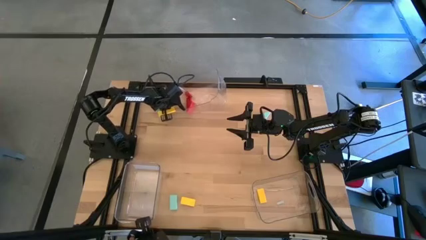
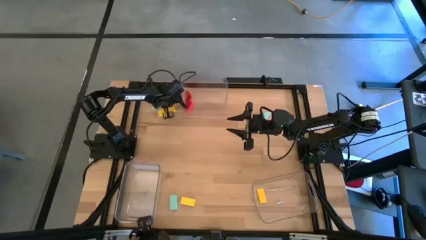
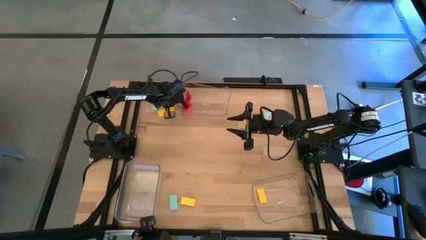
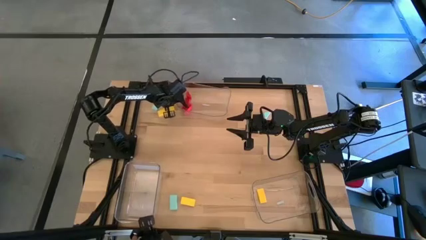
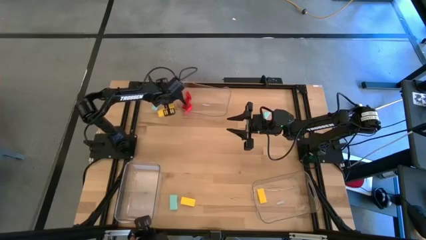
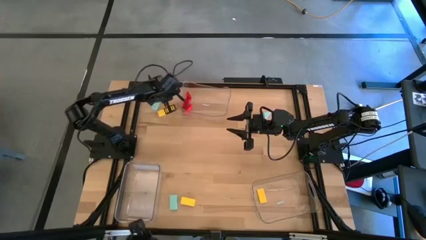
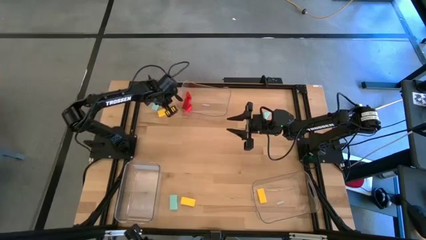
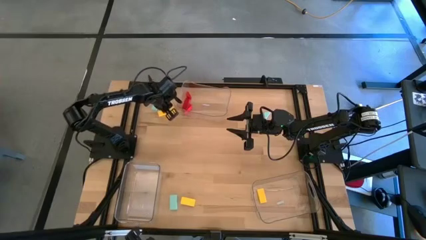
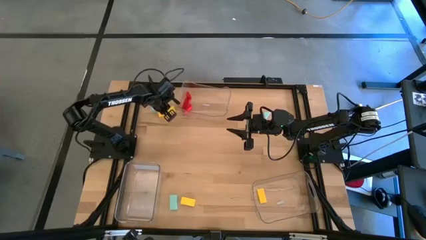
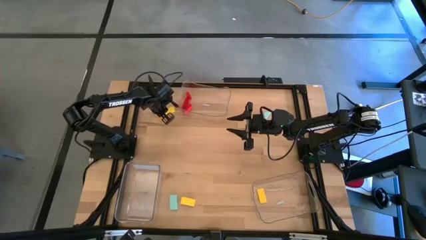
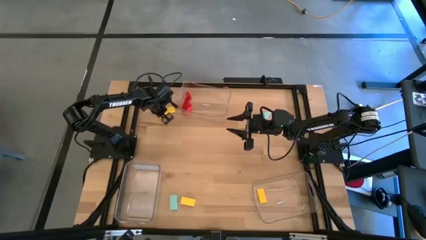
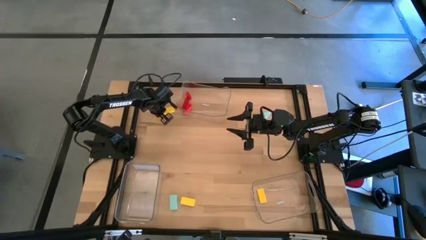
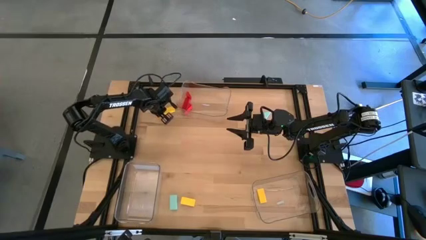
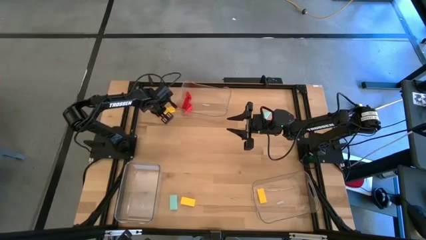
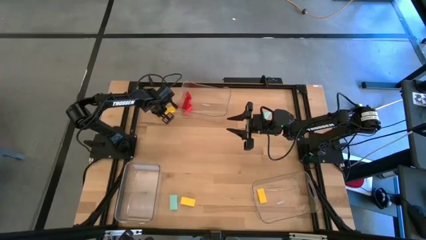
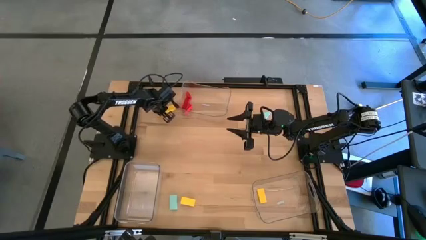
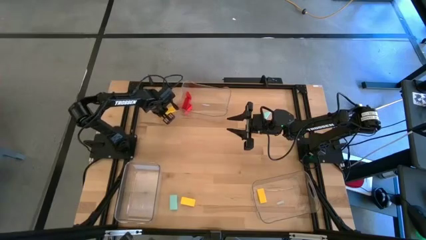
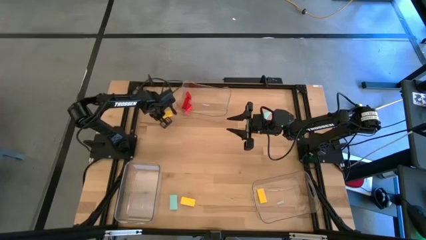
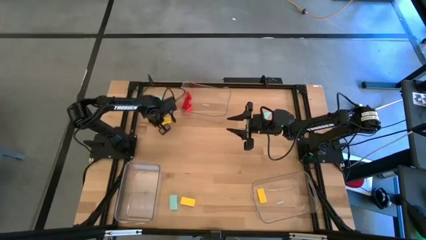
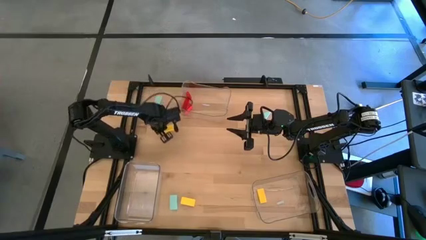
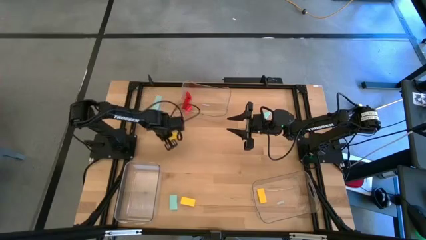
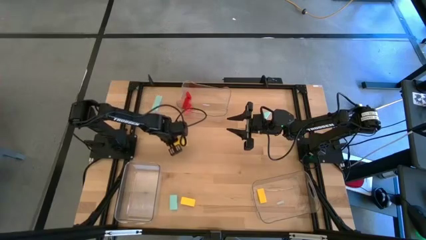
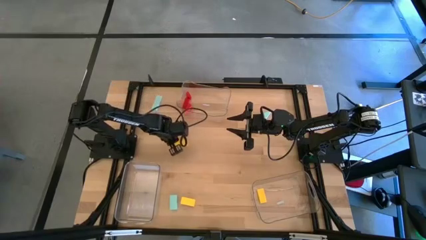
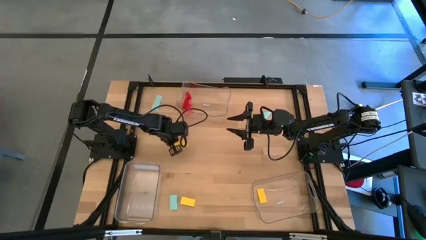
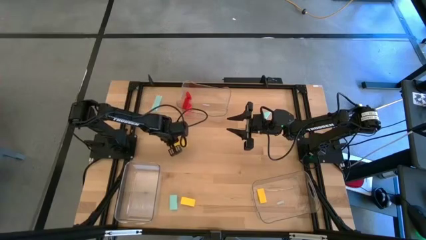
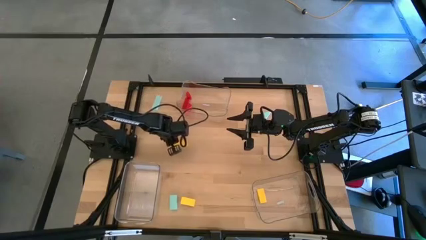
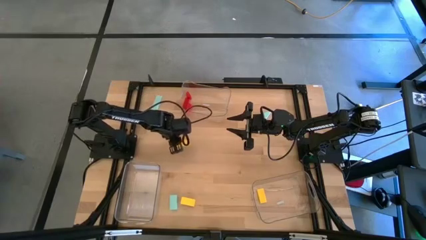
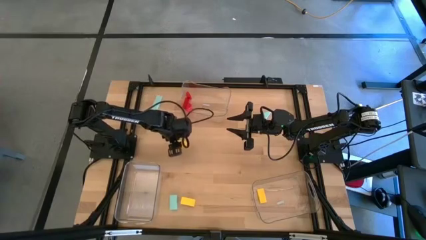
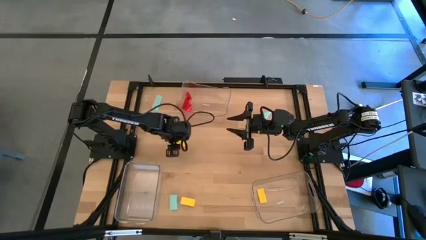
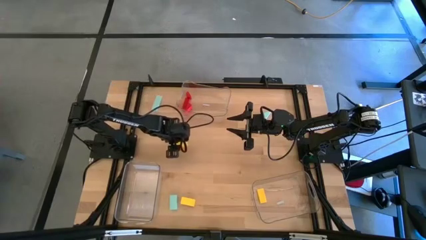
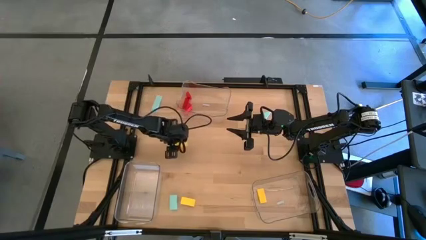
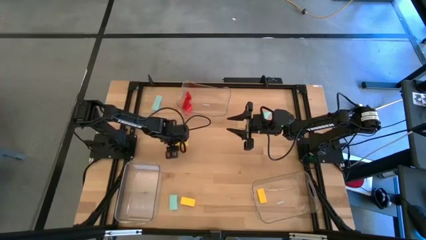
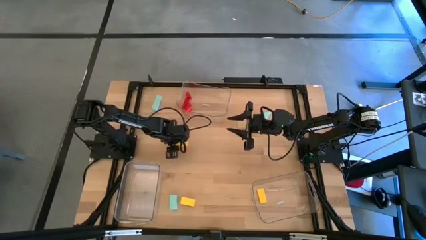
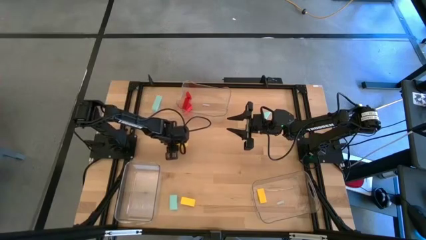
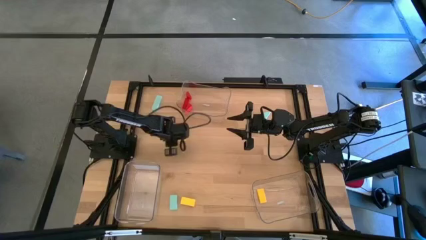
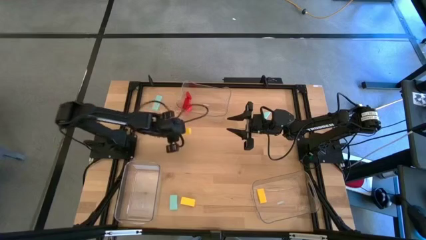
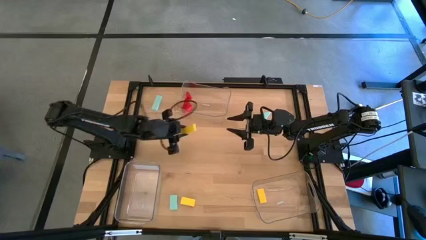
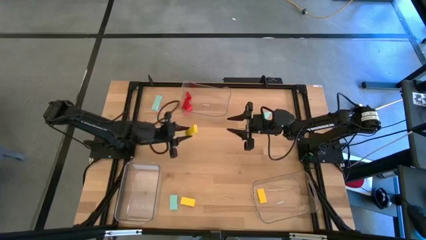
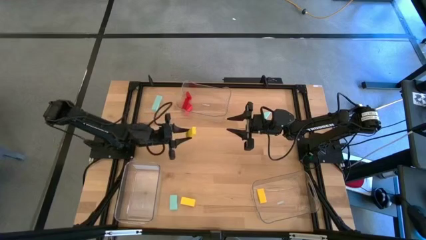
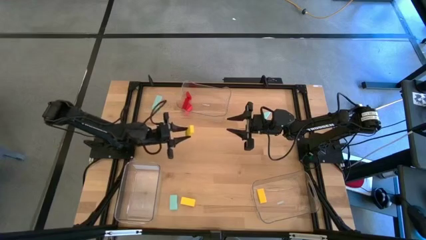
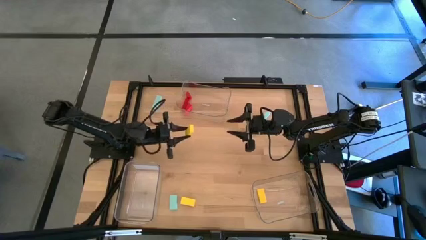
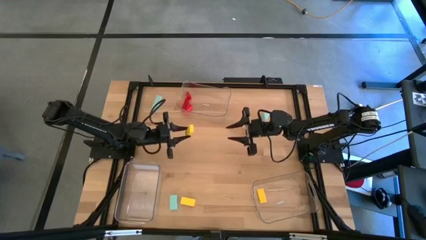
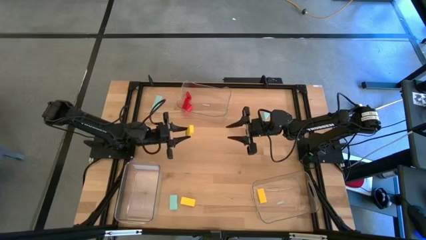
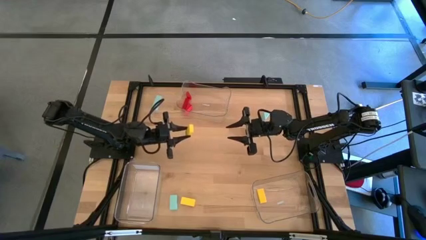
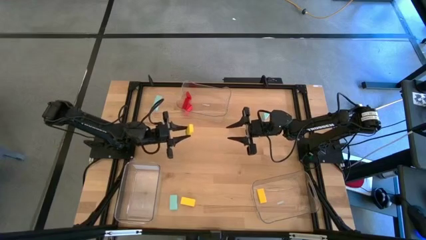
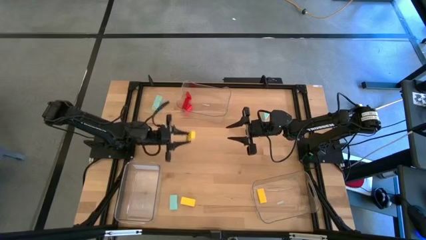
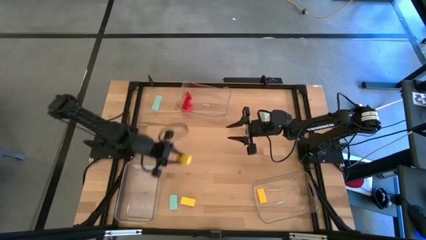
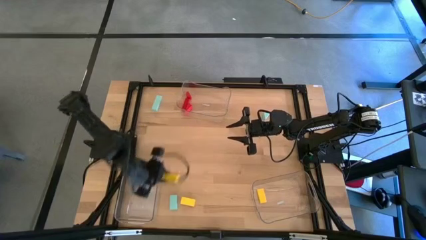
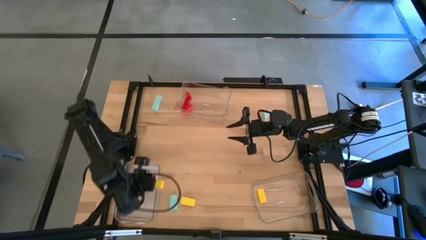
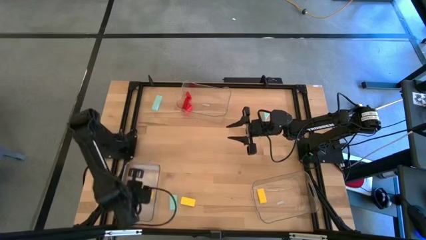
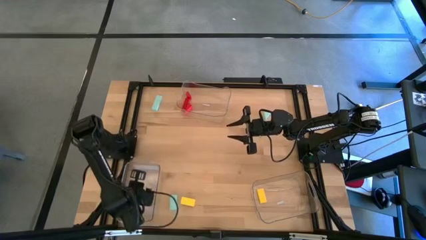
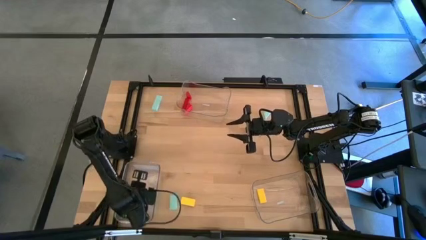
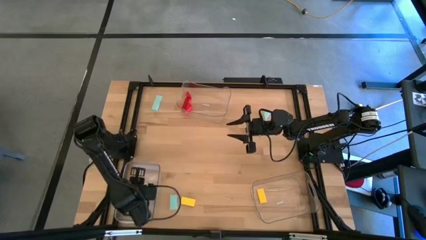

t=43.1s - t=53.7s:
Task: Sort & place blocks by color
Put the top yellow block into the bottom left transparent bin

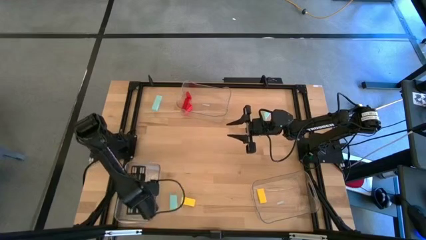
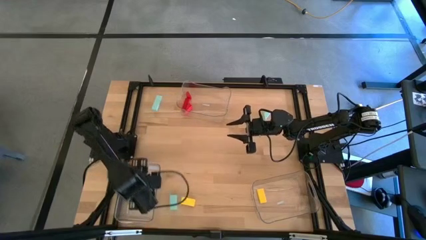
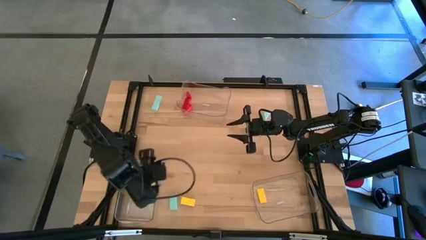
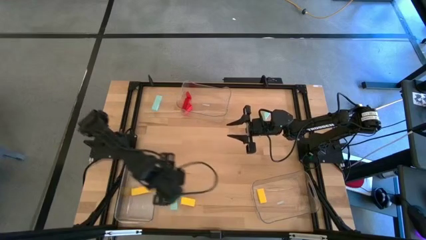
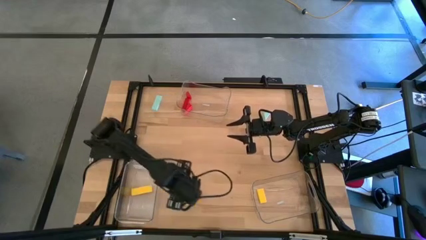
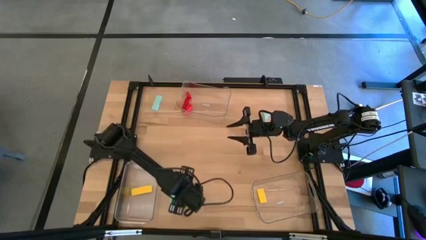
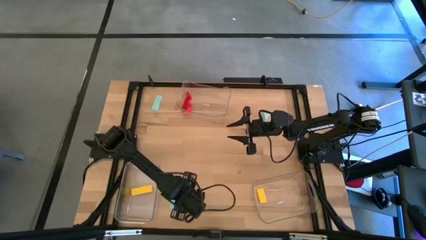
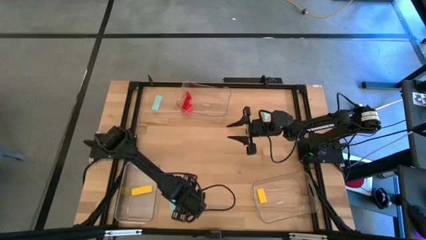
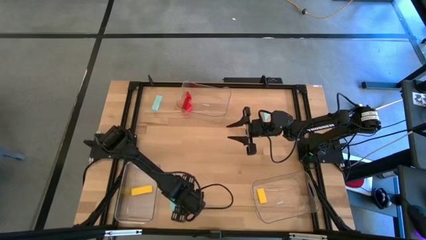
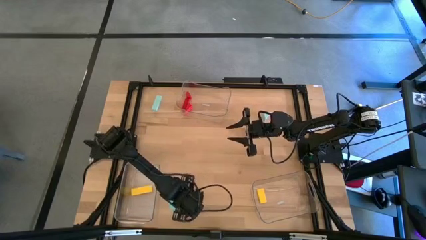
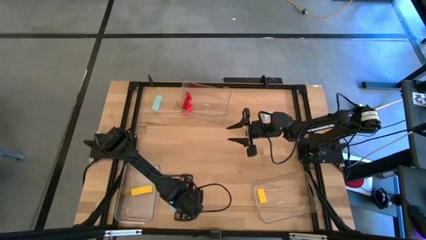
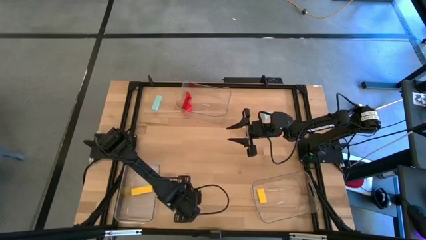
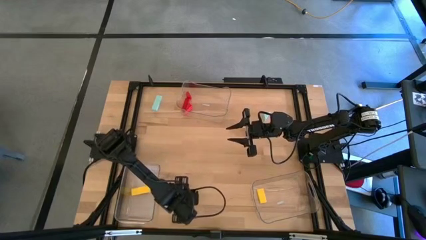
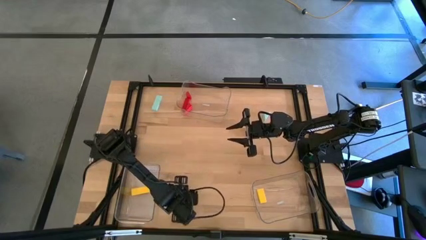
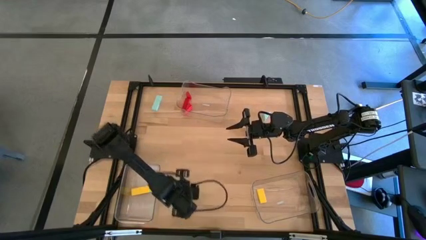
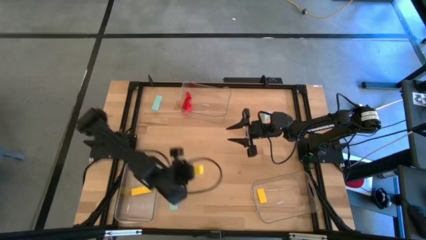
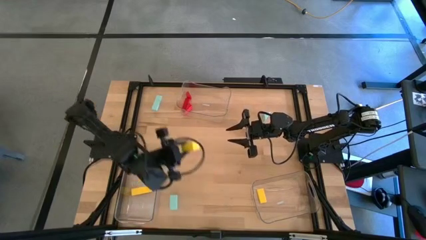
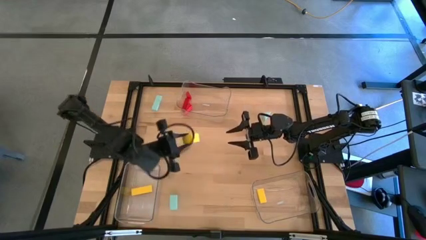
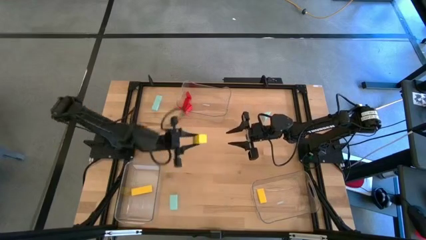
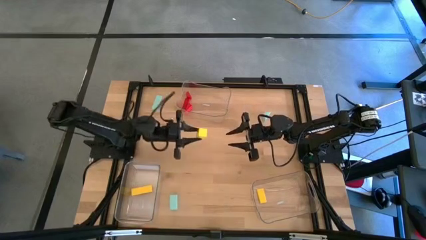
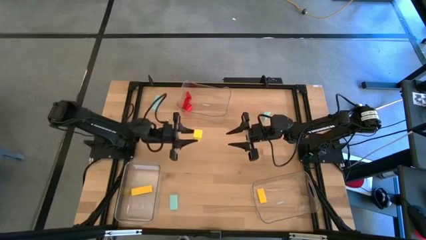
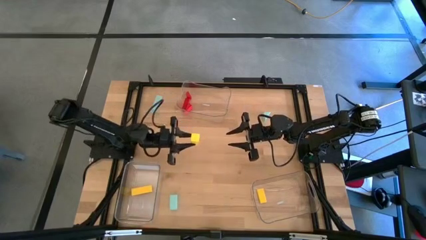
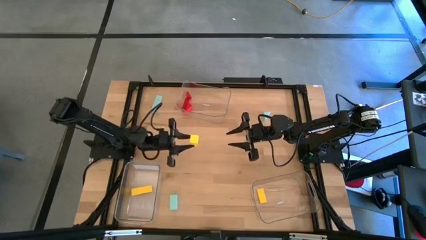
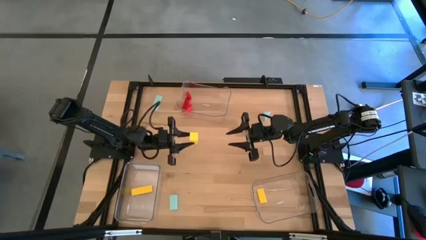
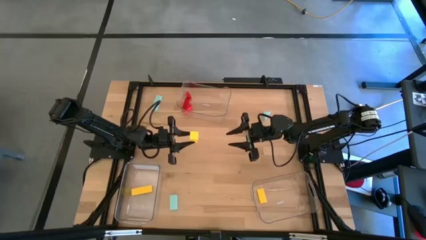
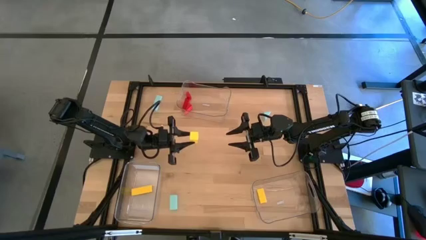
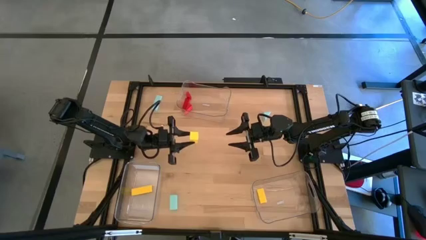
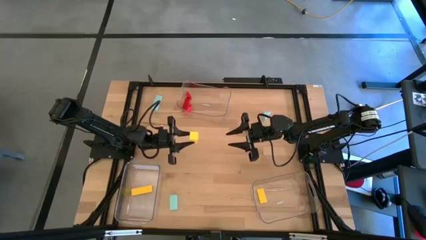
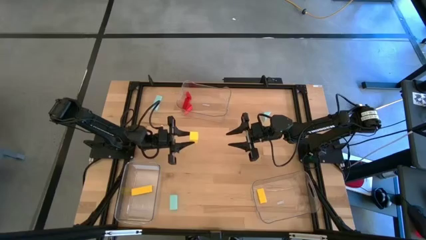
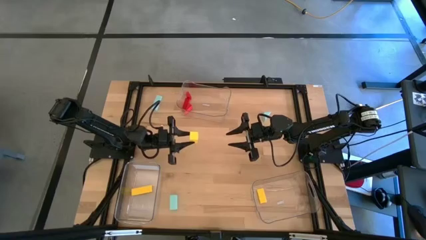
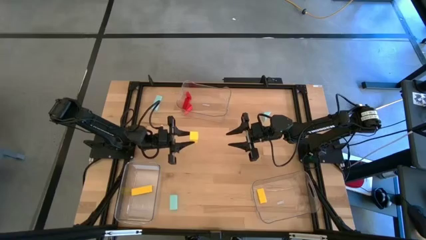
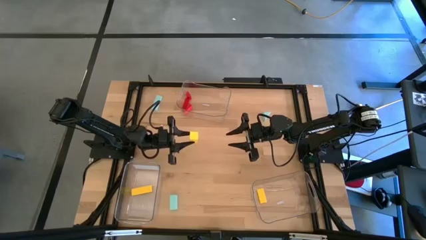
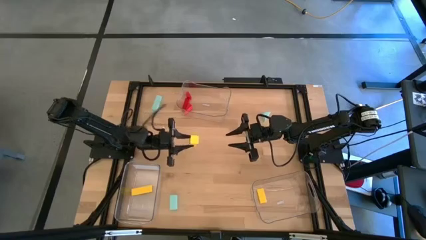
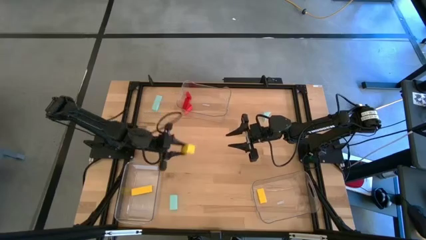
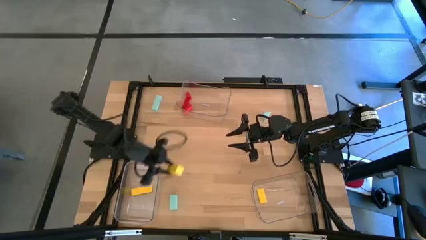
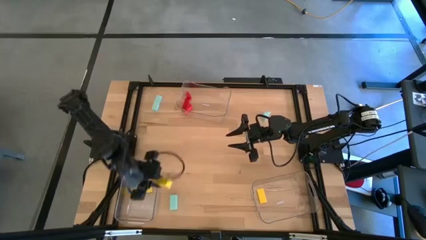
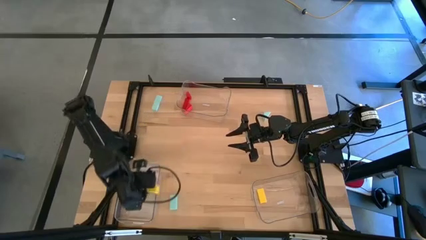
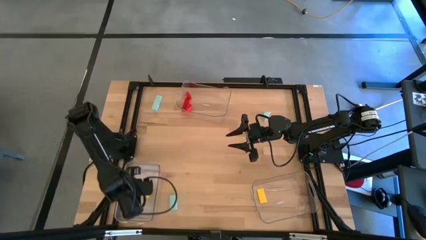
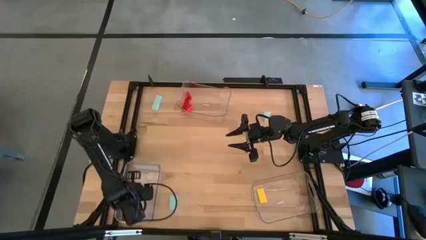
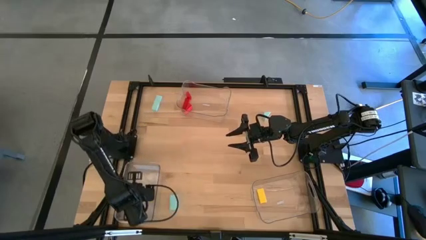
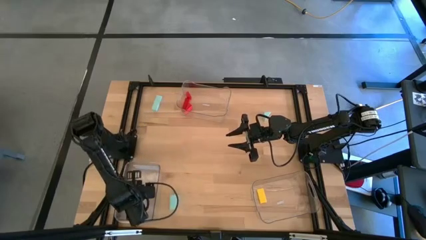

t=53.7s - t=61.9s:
Put the yellow block into the bottom left transparent bin
